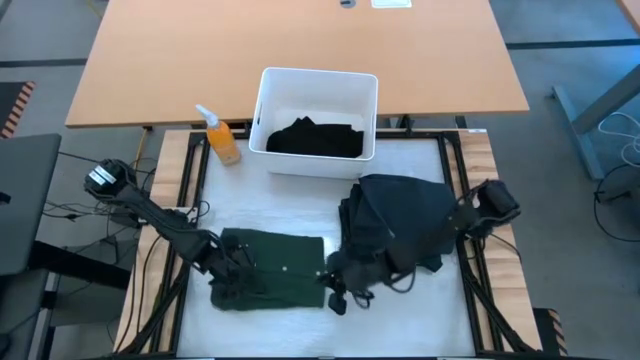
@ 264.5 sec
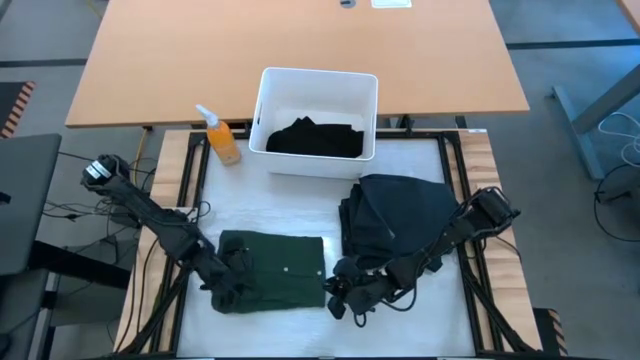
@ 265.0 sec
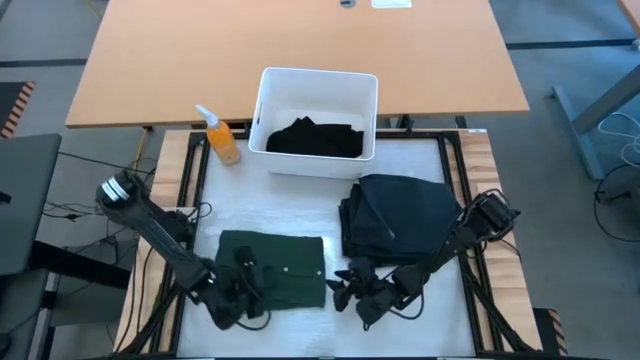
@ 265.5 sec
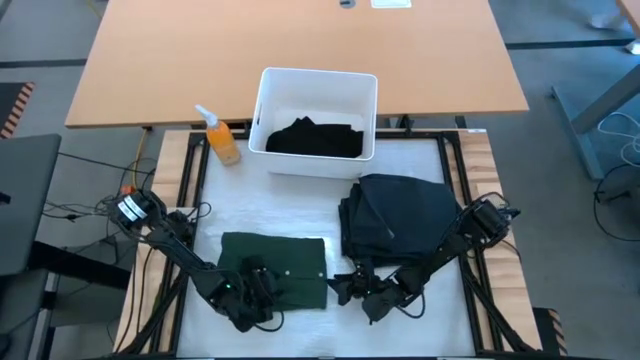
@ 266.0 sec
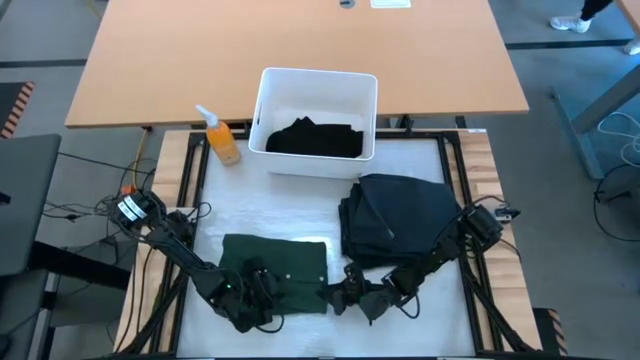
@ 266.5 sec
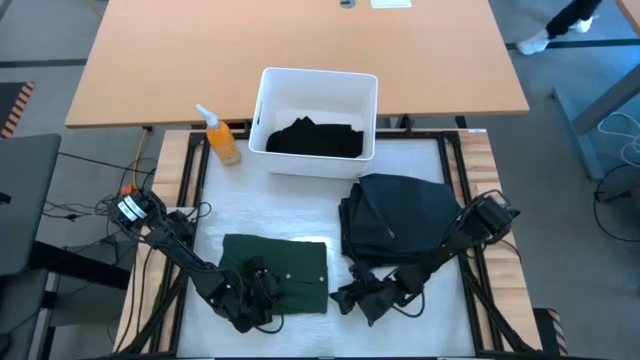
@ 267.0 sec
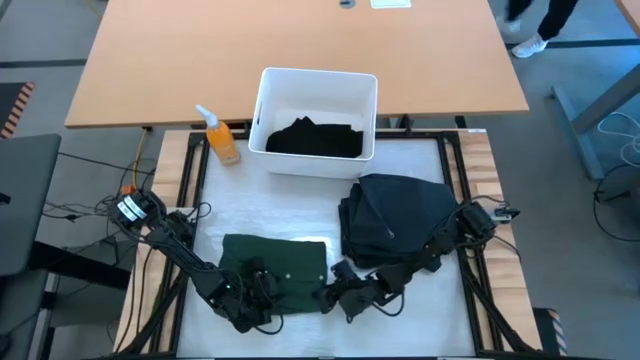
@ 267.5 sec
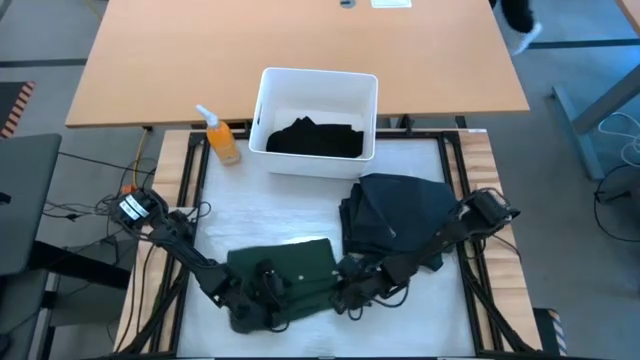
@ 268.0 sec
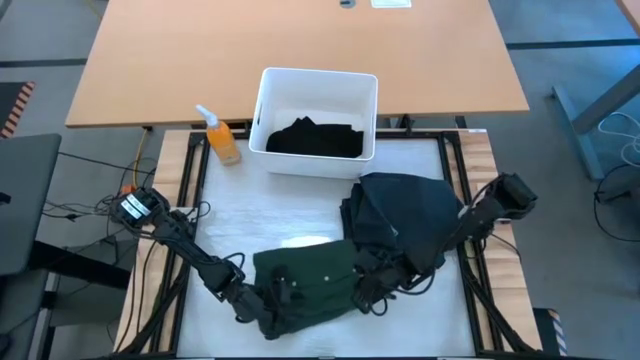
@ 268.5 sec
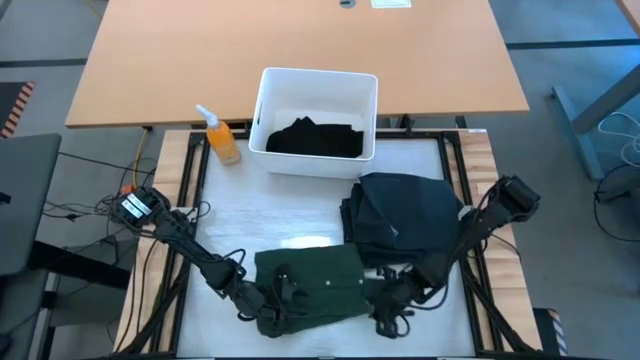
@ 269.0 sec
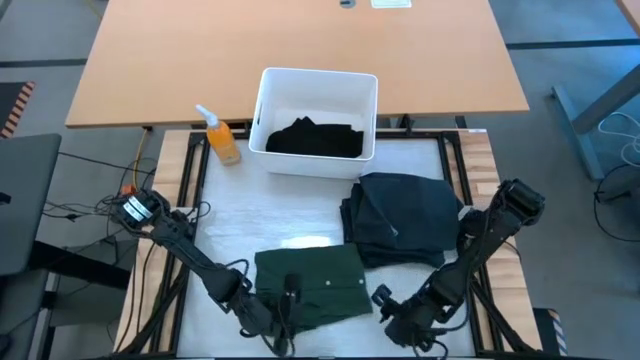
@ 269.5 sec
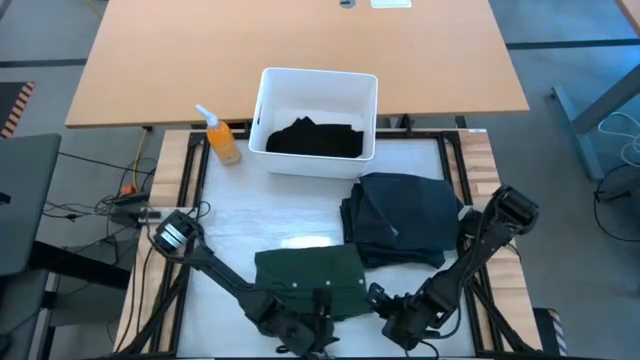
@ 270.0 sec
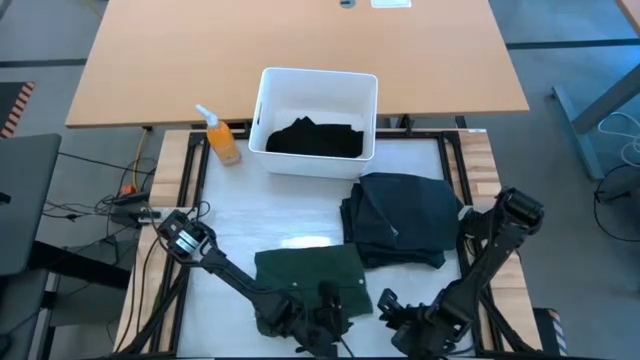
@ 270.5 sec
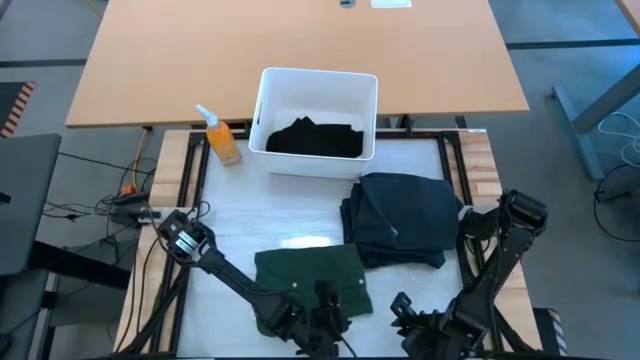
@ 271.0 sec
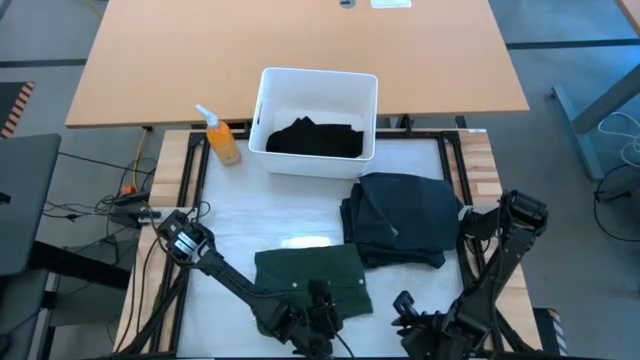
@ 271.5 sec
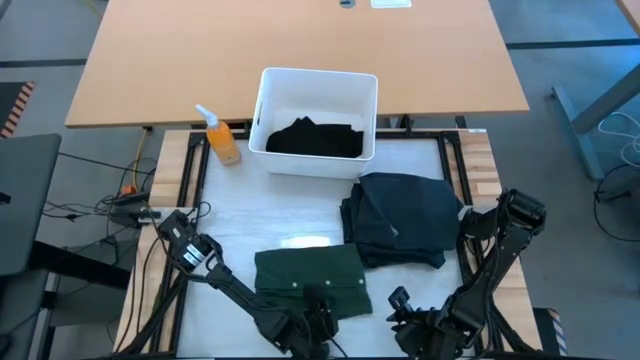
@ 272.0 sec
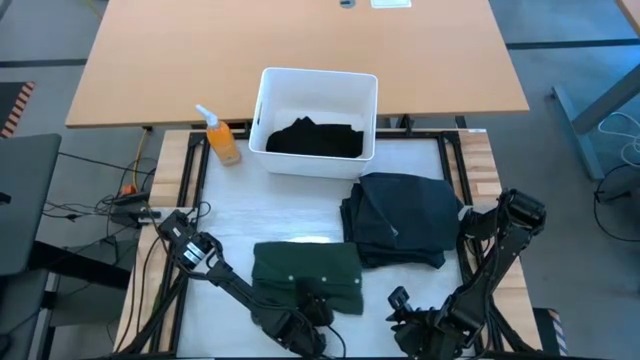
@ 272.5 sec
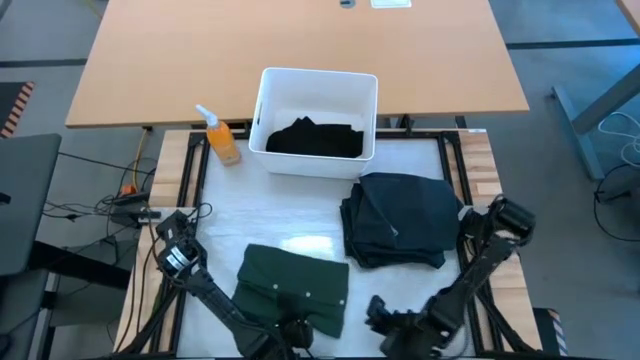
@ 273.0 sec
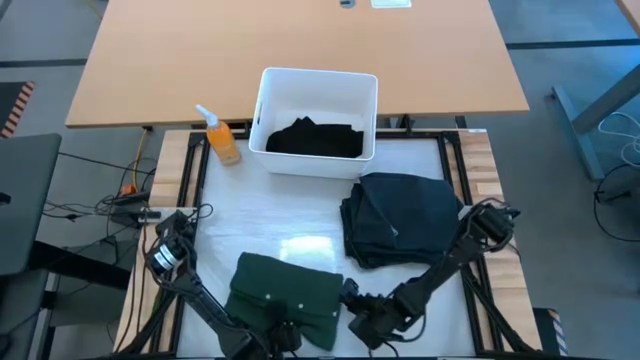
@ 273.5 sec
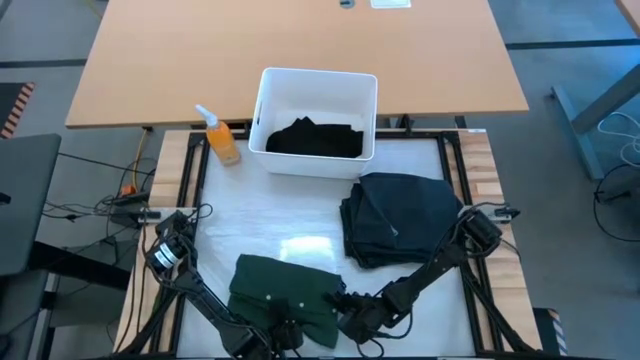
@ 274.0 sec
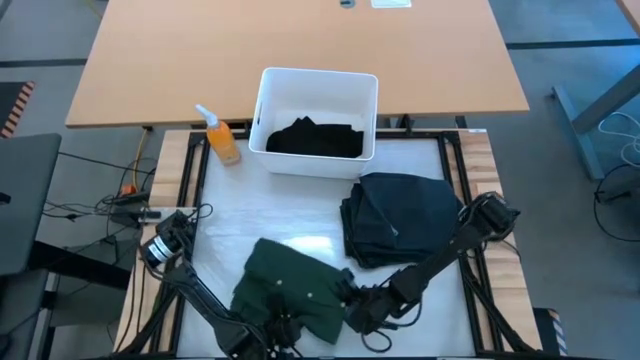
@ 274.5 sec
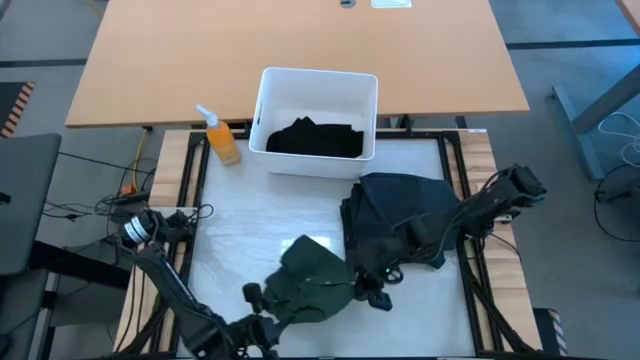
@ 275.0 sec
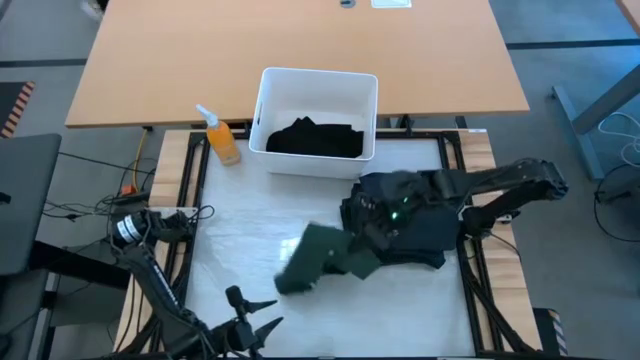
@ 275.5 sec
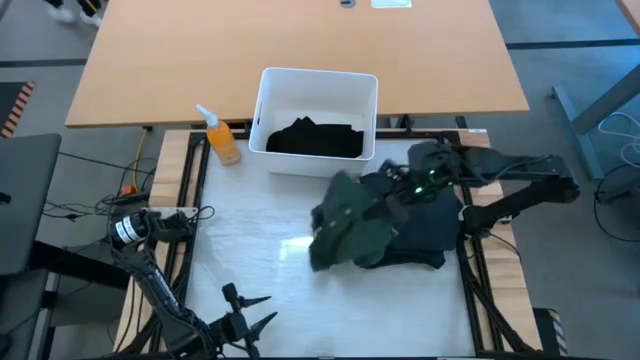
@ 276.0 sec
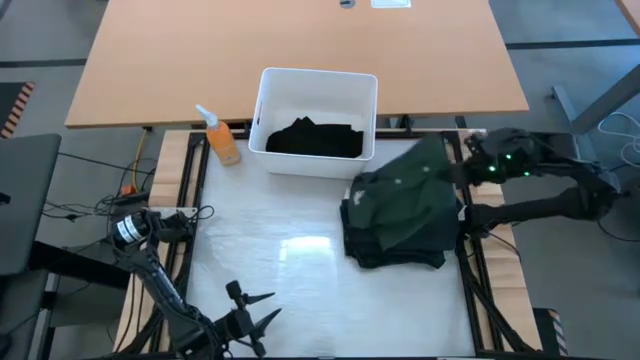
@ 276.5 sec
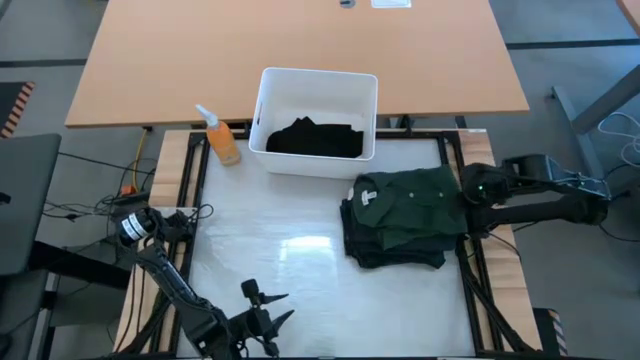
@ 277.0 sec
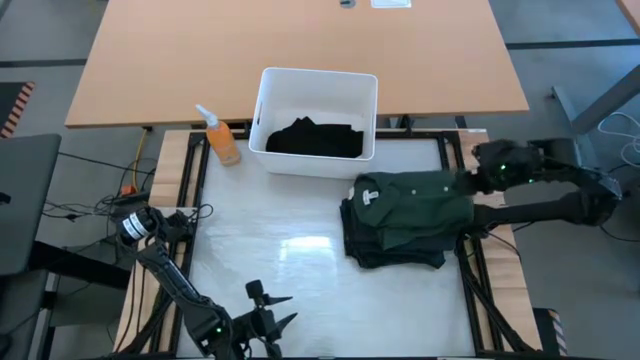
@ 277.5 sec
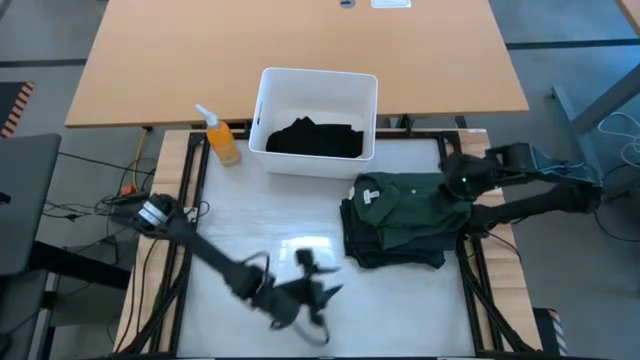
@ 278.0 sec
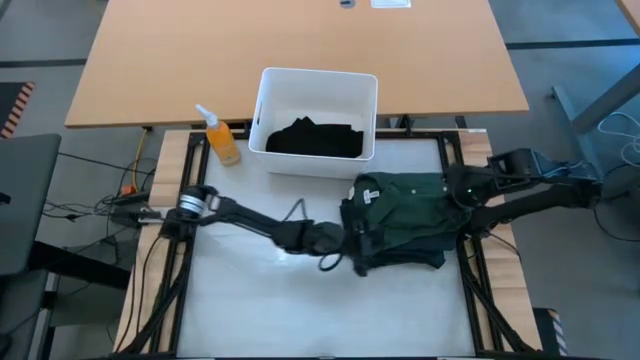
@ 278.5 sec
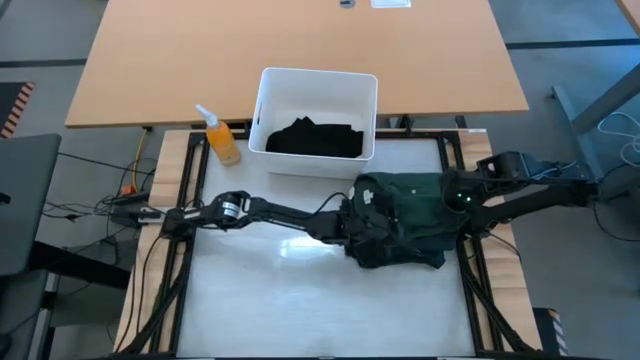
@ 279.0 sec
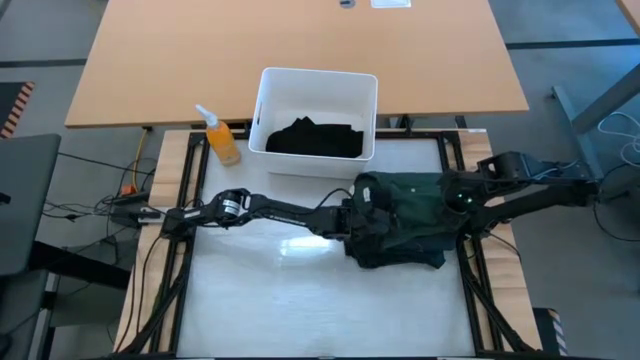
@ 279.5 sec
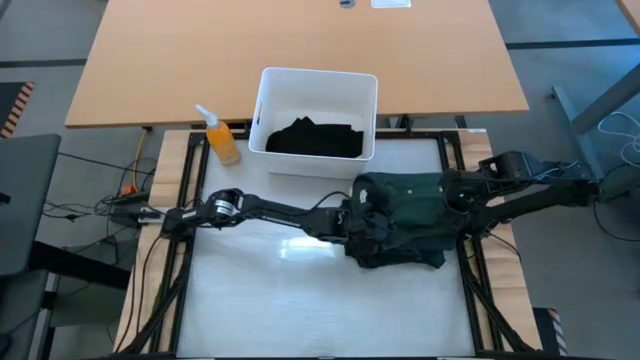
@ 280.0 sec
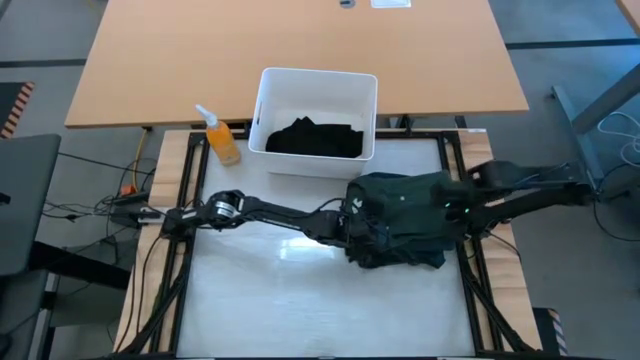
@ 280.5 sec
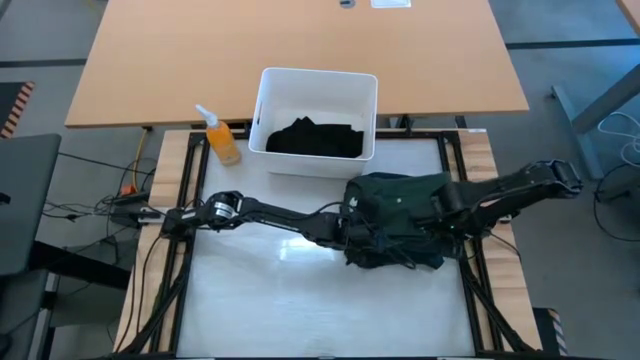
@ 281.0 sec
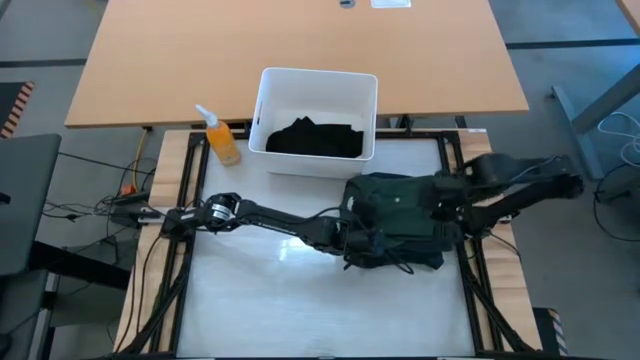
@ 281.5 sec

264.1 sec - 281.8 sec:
Task: Fold laundry
Stack the folded green polo shirt on top of the folded black short

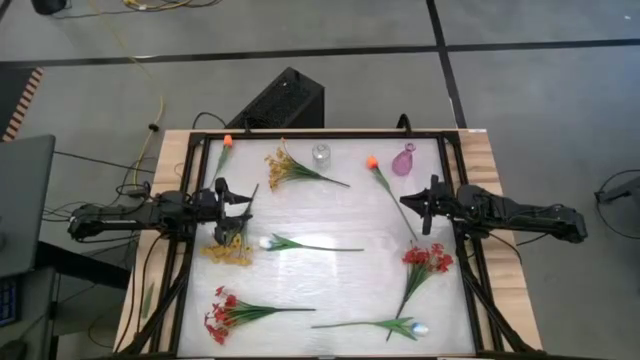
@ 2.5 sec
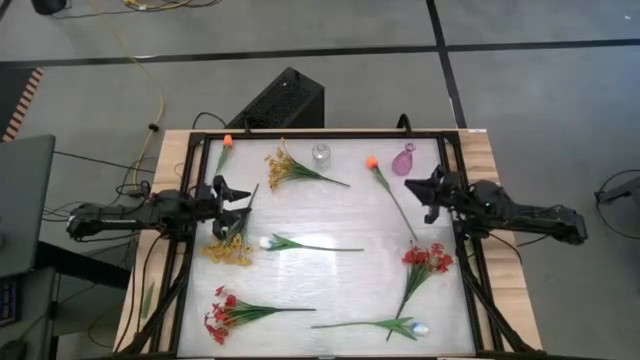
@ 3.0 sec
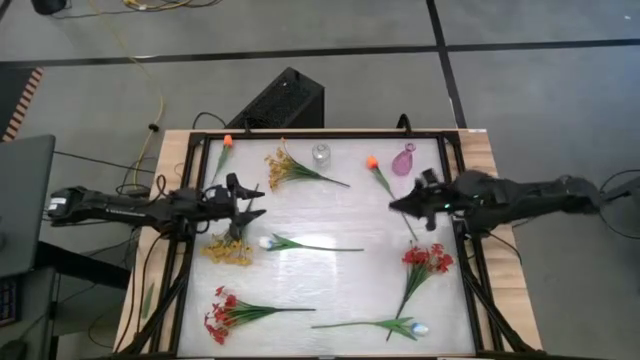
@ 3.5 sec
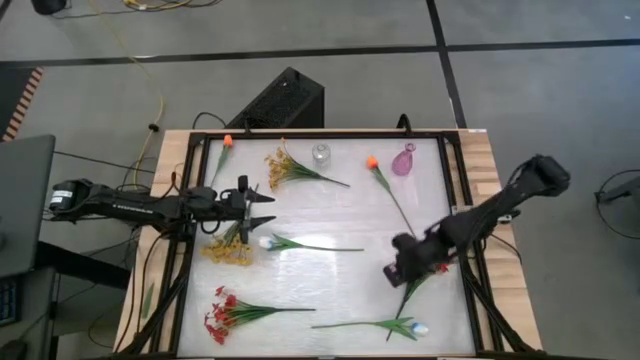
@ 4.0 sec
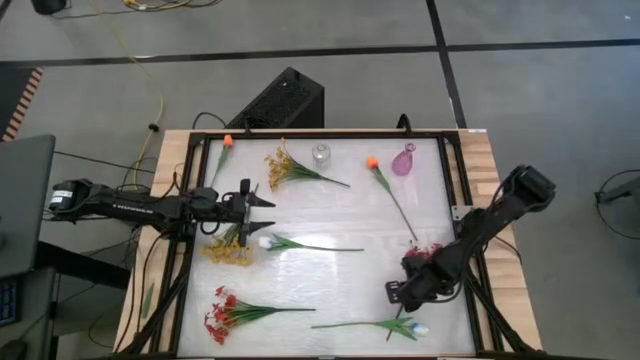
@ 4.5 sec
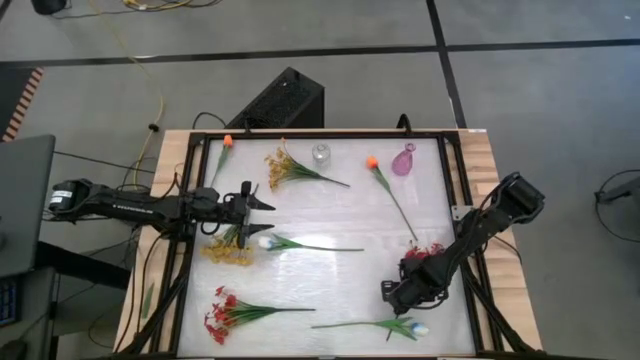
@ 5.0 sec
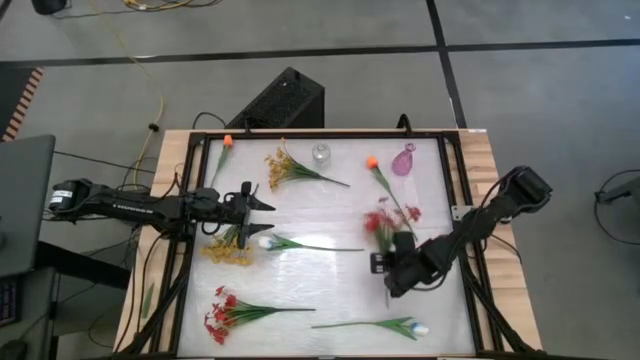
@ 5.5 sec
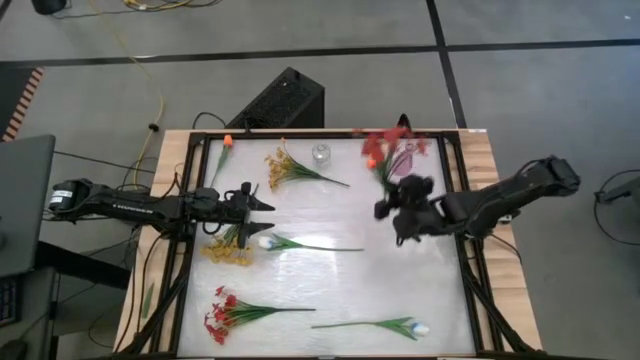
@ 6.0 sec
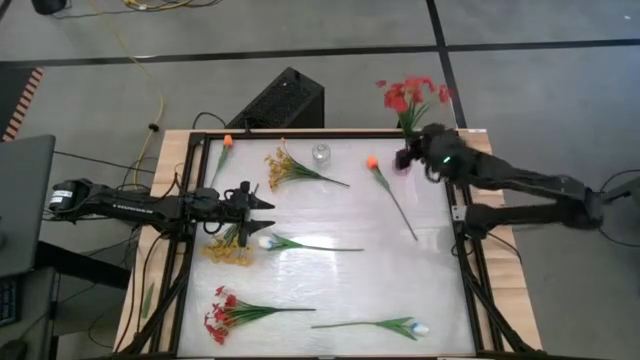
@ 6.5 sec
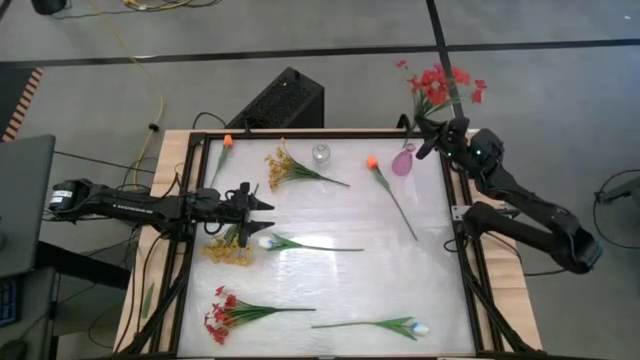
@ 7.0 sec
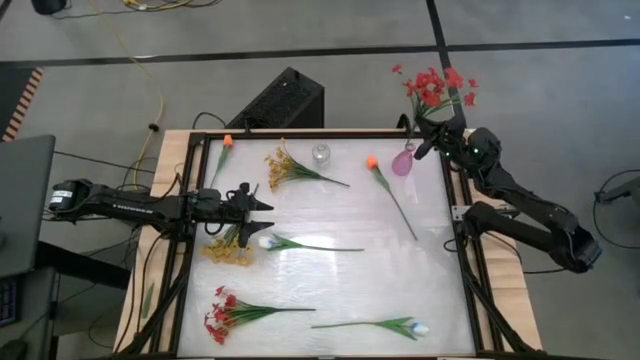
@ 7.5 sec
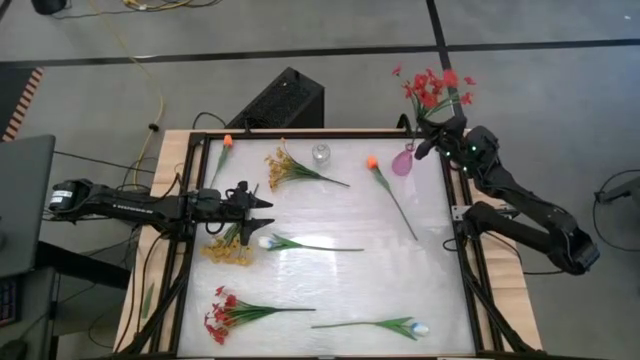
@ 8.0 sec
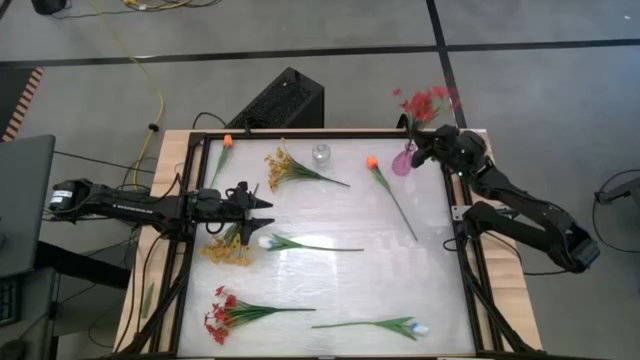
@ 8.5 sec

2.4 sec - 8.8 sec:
Task: Sort flowers into vase by color
Put the right red flowers into the purple vase
